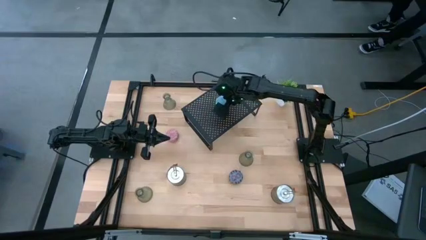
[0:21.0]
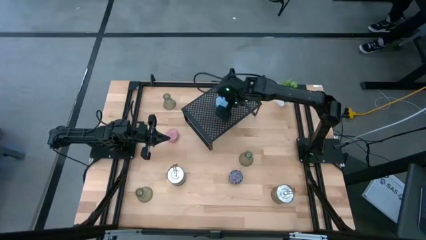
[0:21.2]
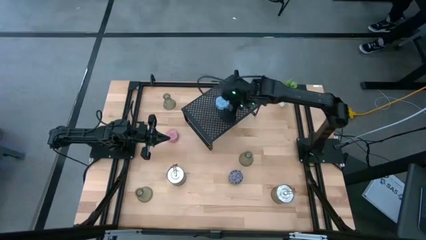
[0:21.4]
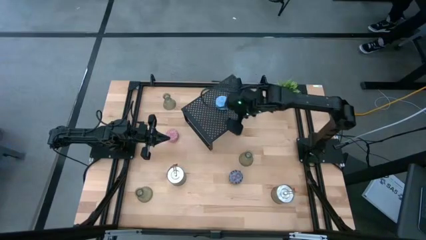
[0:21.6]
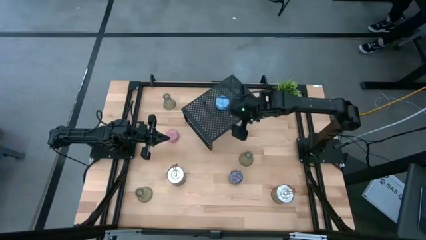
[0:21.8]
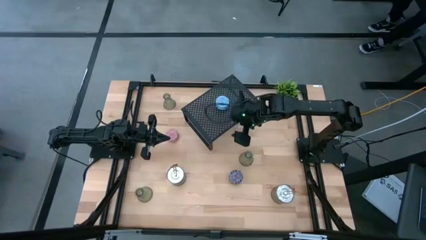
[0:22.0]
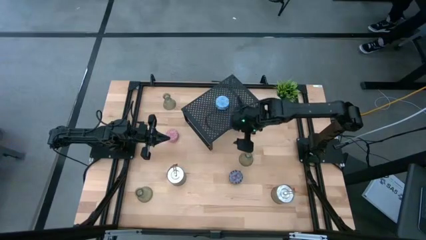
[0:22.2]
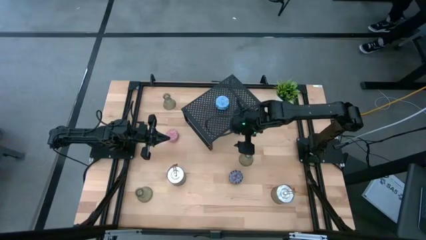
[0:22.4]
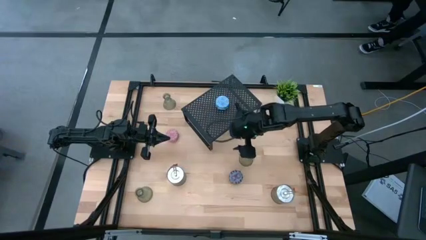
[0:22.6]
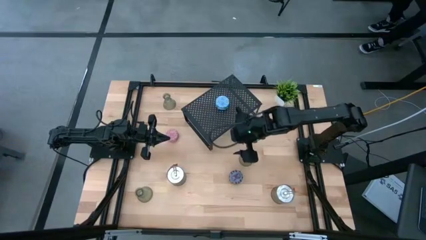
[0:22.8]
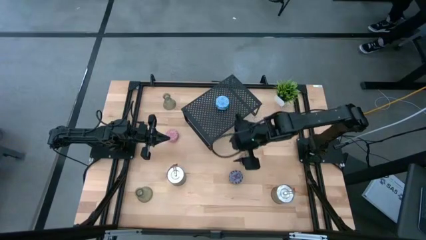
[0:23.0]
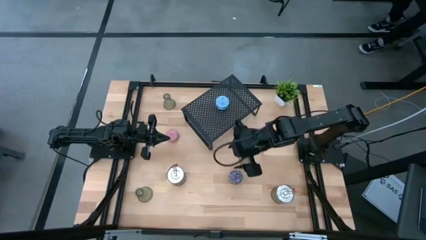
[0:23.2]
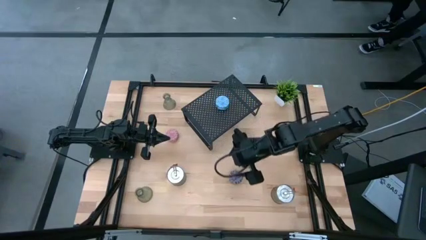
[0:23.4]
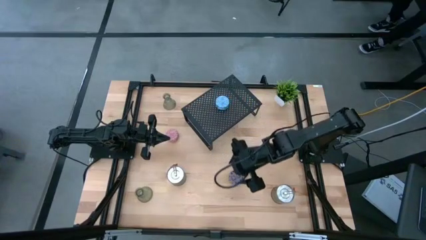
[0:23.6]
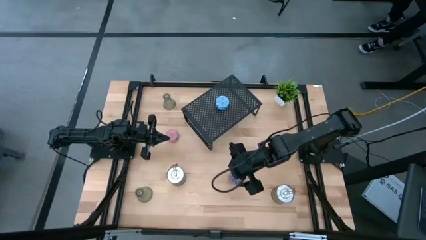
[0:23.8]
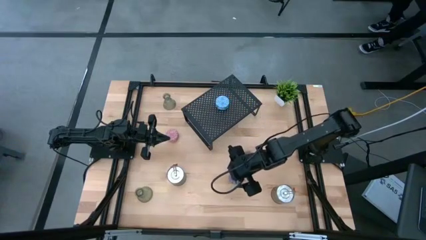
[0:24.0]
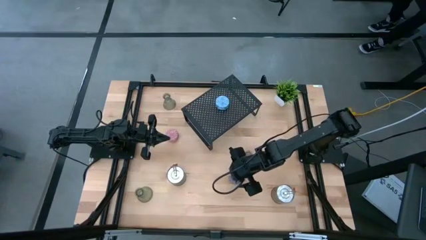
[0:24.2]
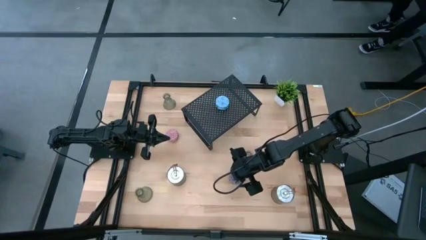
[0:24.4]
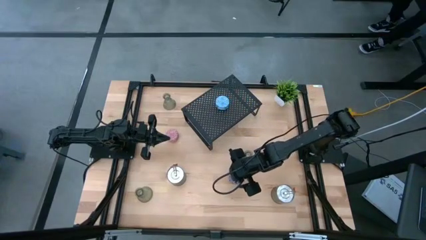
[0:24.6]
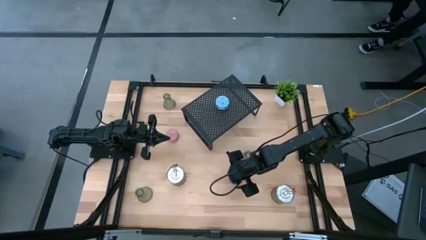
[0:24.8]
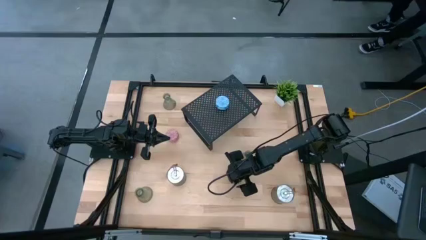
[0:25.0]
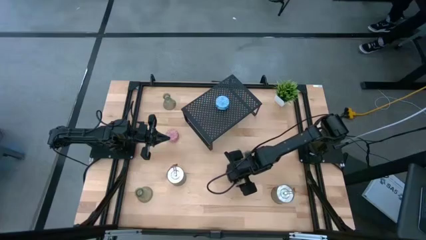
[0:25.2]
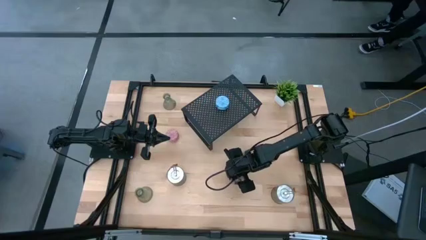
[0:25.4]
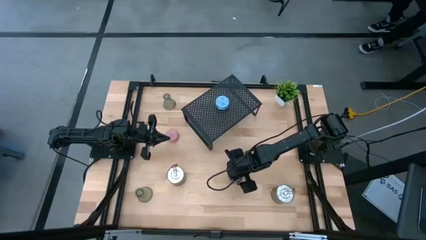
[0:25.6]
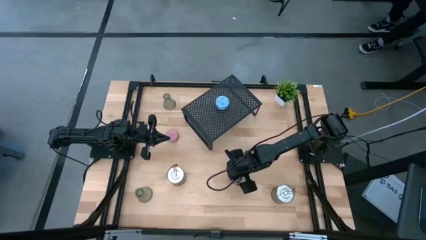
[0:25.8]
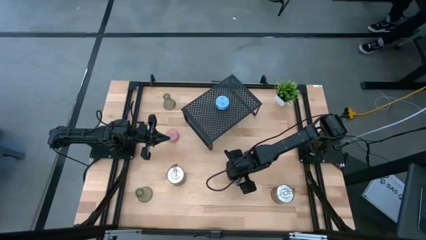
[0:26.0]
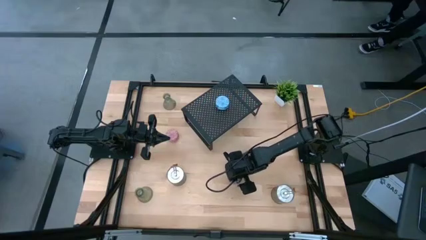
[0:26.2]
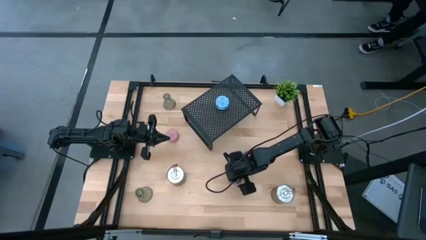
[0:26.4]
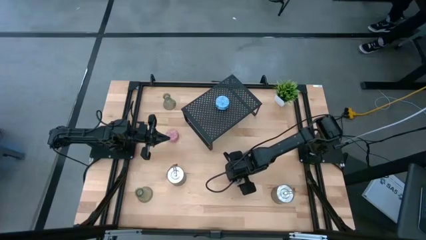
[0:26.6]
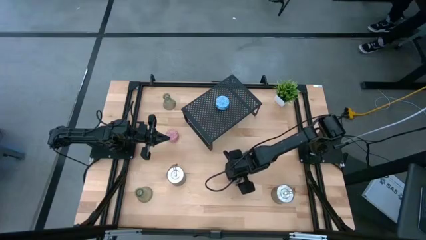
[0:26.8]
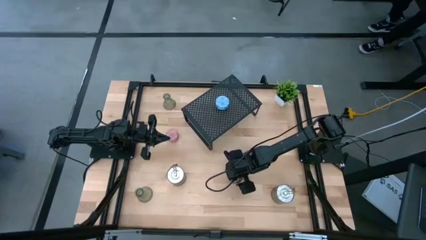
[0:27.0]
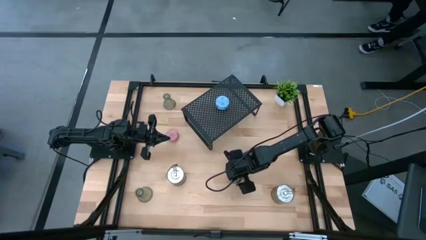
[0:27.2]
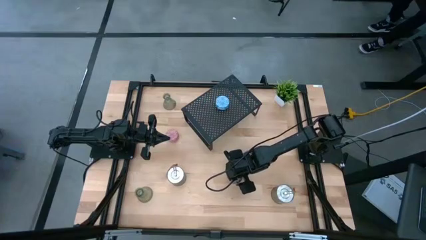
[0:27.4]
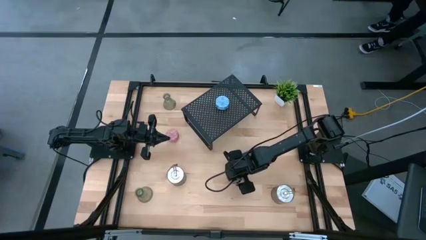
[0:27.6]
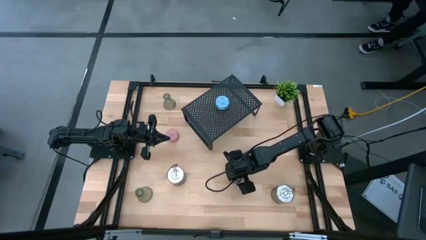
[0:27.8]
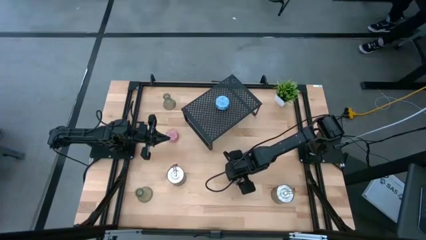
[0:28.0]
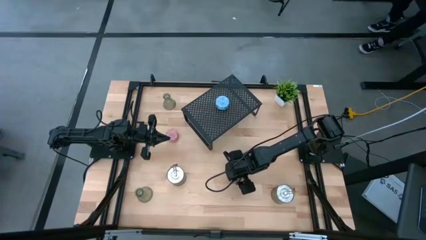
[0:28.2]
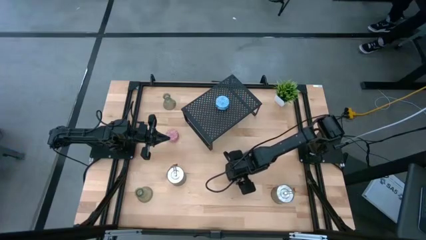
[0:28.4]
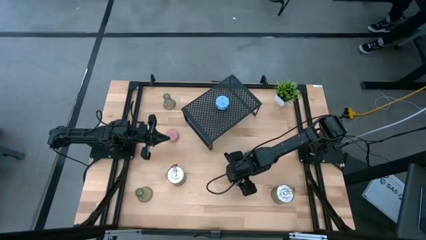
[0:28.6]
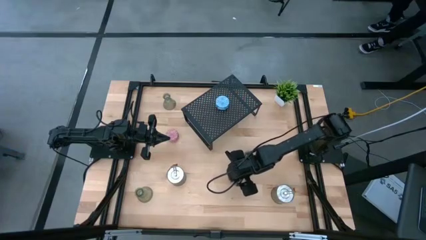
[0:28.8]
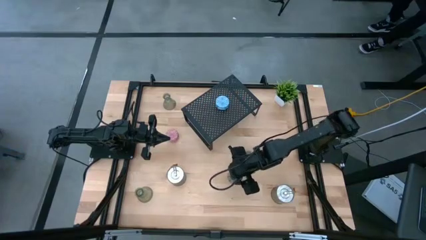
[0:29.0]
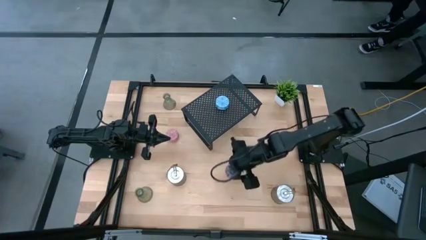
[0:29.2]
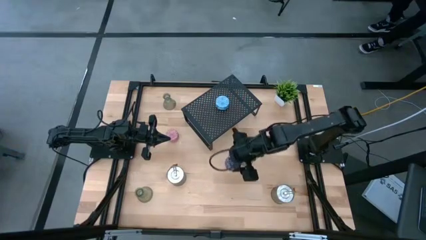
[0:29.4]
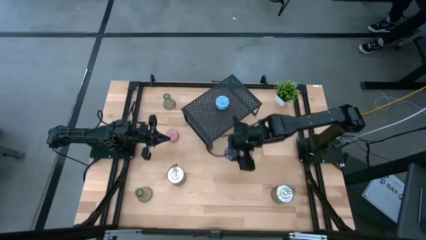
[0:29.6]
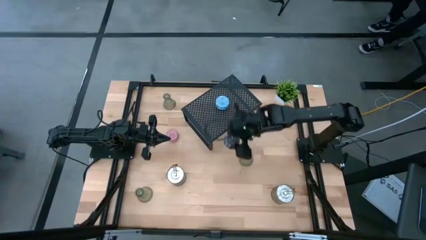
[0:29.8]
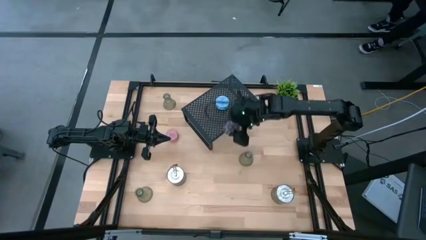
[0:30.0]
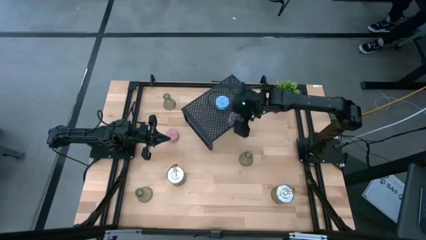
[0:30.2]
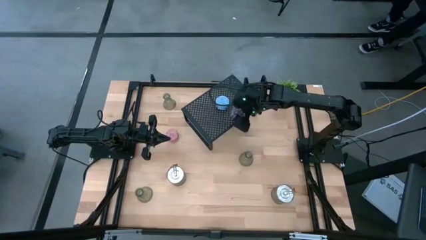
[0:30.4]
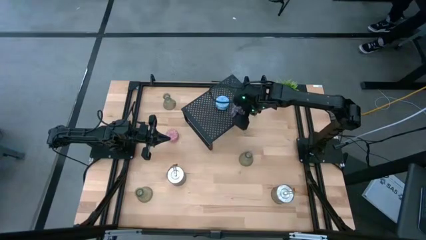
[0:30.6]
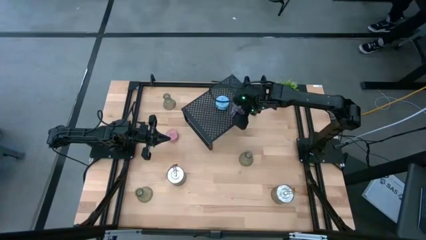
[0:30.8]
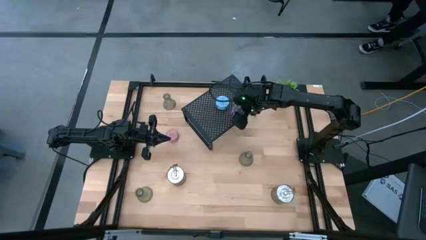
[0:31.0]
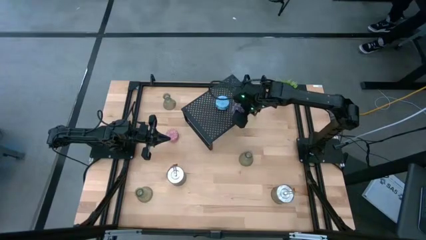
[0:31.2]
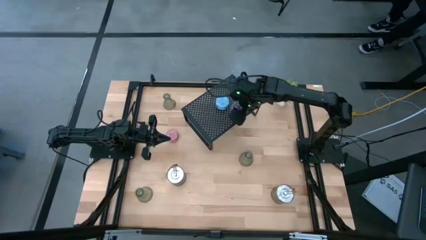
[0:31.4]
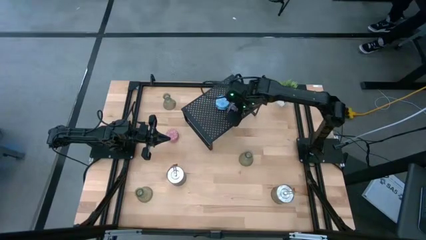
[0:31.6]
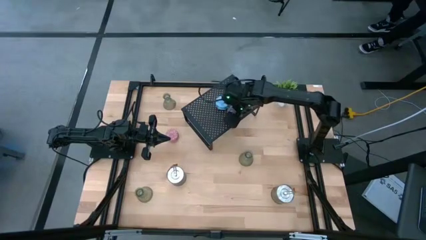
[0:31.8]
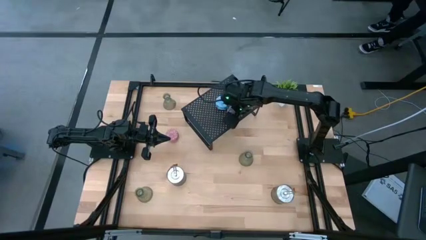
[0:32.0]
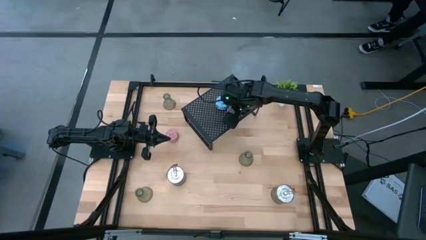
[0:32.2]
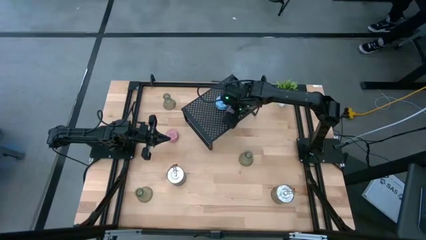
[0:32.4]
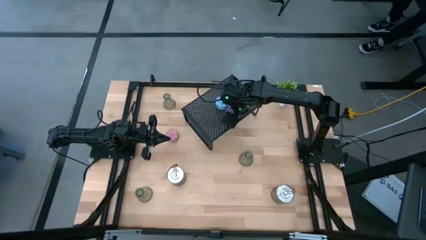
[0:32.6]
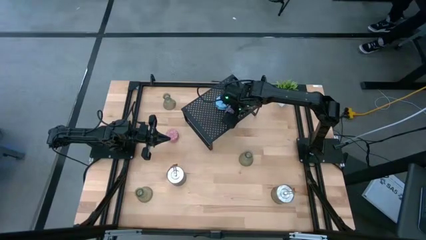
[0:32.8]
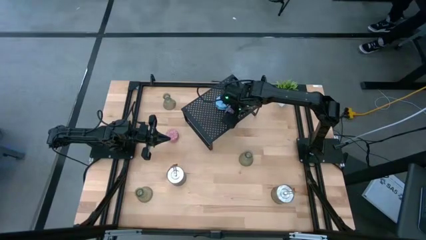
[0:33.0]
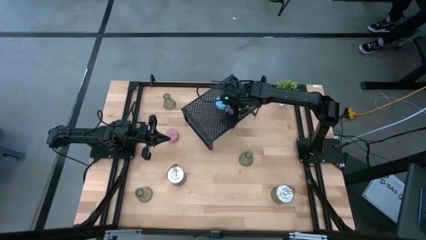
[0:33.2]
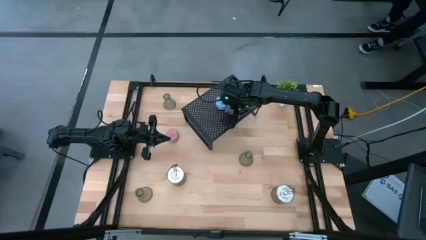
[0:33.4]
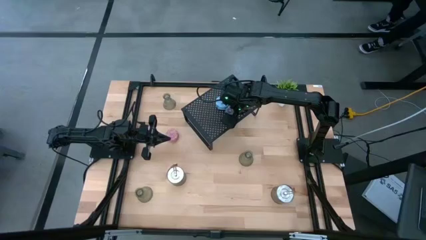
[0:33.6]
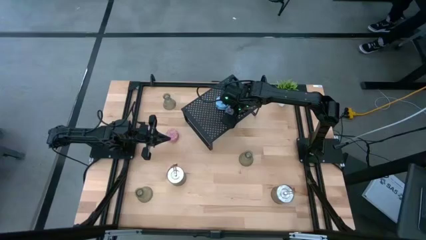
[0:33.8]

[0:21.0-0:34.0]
Task: Pick & Place candle stick holders
Put the red small scented candle on the shelf aligned with the light blue small scented candle
